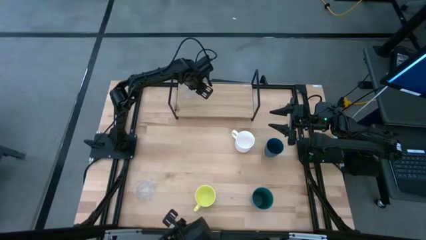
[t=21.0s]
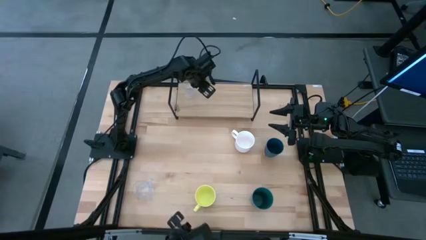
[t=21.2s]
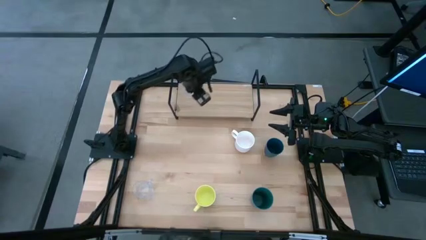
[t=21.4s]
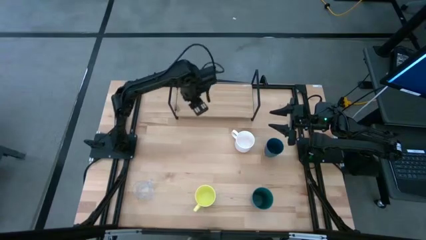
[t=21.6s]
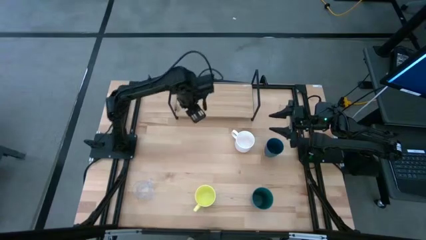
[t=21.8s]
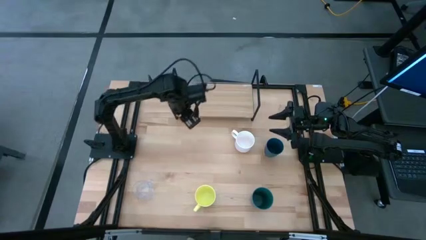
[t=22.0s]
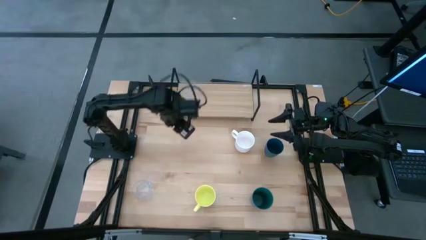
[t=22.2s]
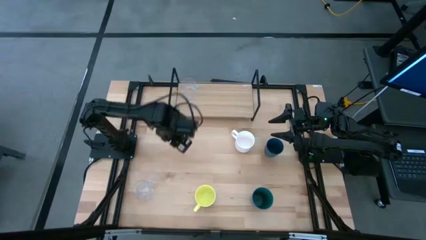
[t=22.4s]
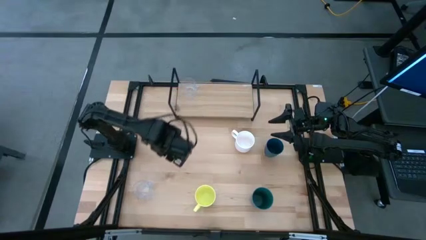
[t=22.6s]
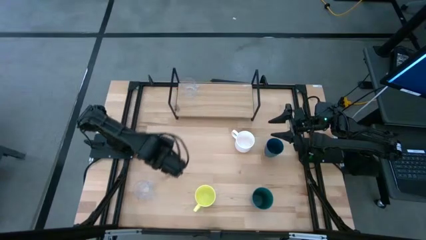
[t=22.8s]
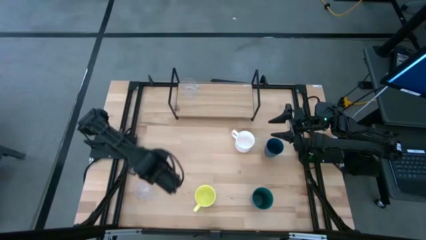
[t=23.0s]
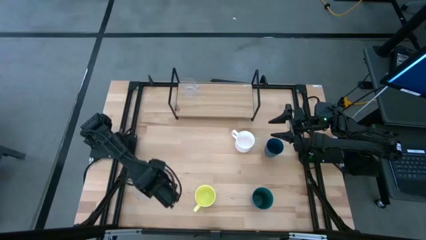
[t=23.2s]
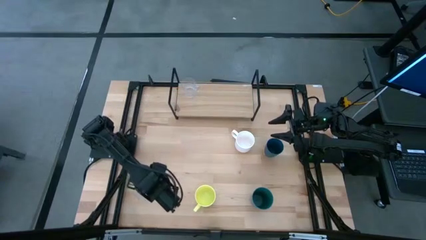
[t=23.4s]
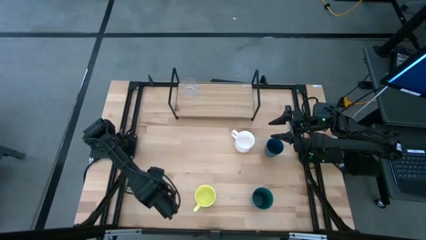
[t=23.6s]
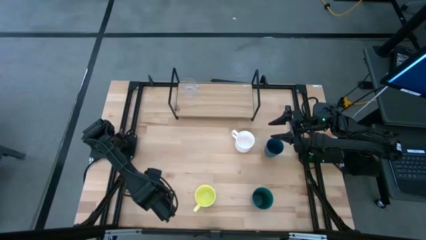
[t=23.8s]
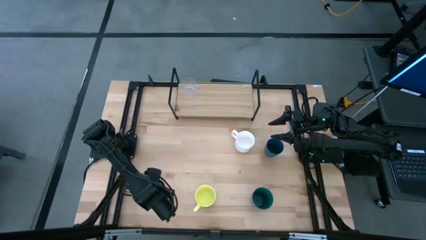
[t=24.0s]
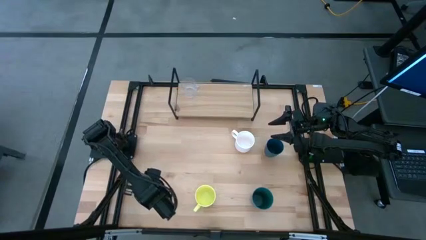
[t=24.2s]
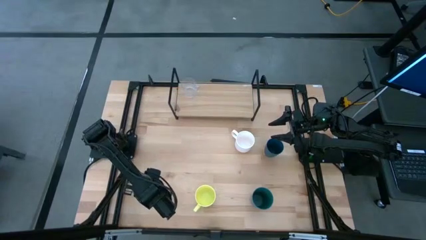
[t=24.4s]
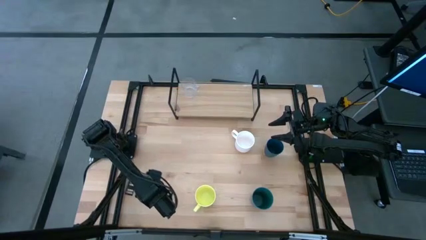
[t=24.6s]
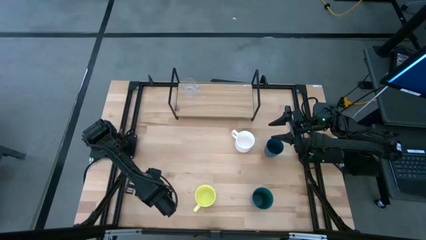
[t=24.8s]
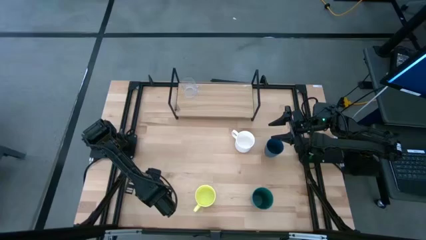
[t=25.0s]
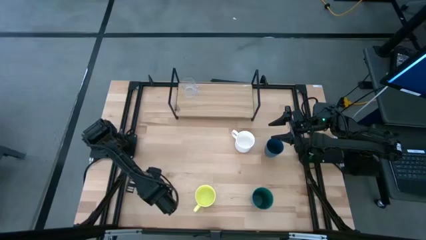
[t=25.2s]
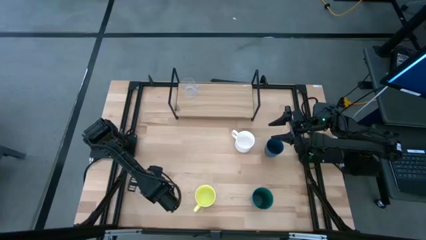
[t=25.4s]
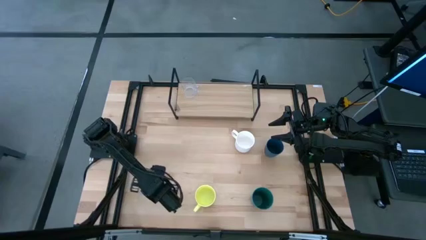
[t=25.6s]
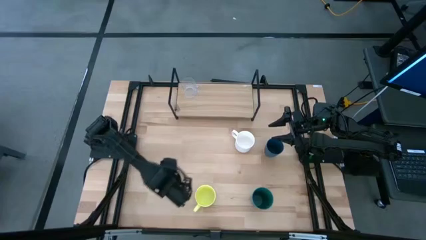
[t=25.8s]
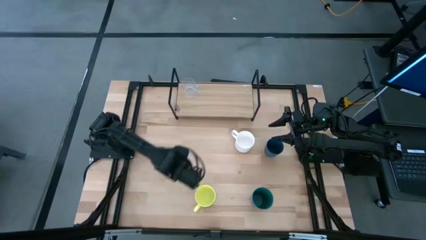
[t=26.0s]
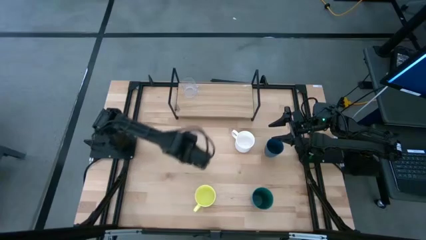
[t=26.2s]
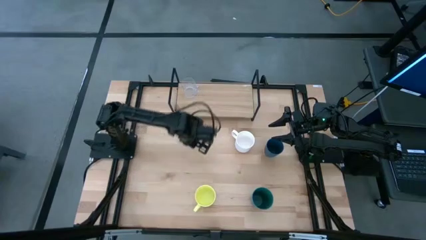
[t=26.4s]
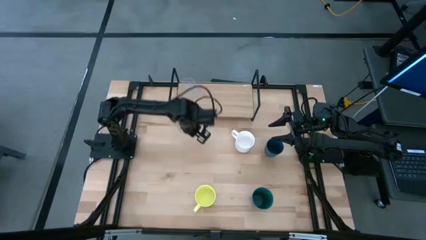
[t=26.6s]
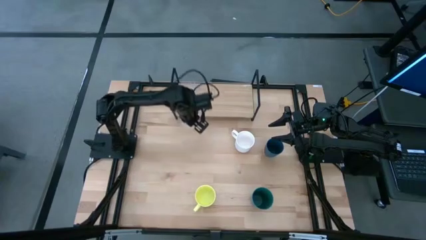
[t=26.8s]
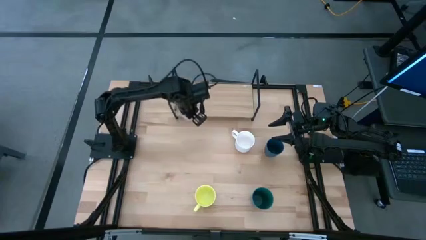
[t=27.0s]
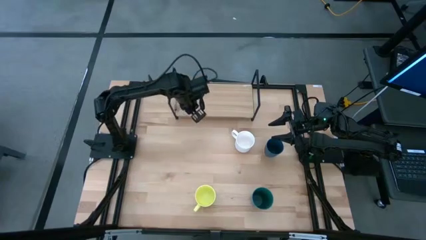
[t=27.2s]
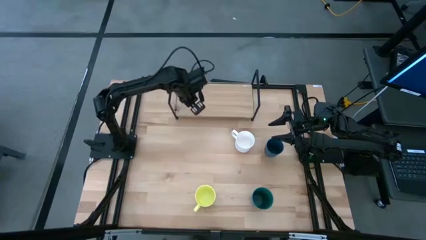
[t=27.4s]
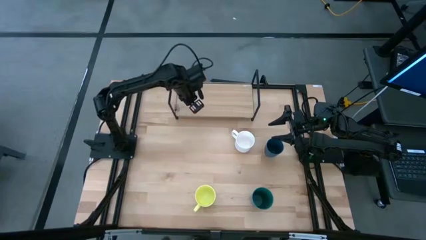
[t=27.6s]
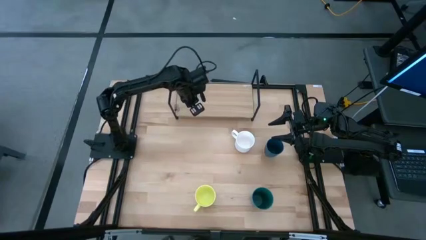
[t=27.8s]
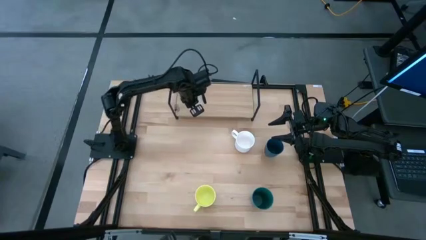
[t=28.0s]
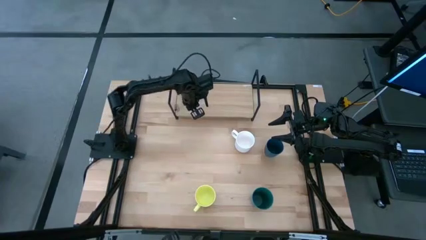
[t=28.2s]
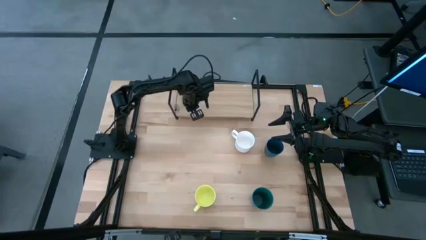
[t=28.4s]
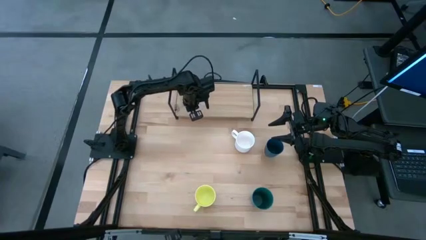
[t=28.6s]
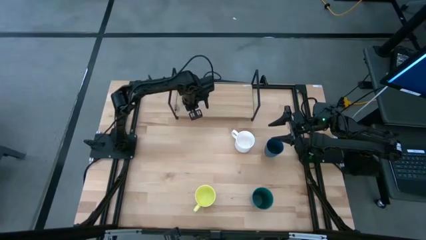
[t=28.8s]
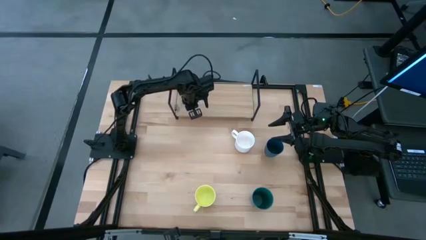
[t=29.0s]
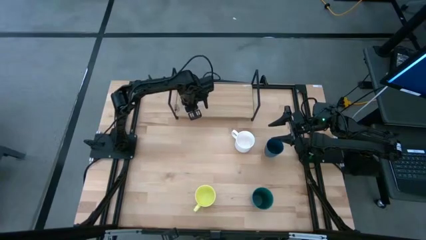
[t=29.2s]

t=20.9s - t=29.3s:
Task: Stack small to large cups/mugs on shelf
Align the transparent mug with the other transparent mug on the shelf

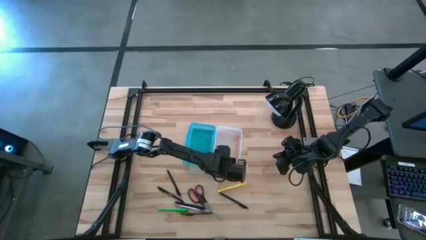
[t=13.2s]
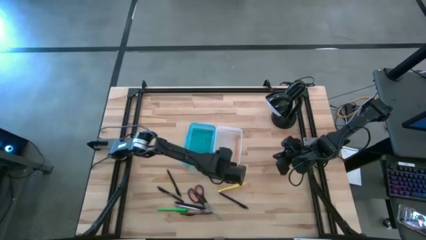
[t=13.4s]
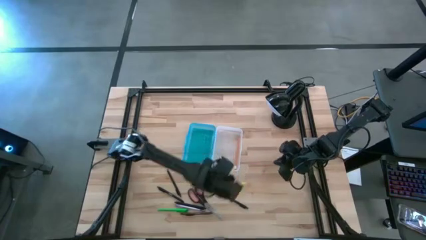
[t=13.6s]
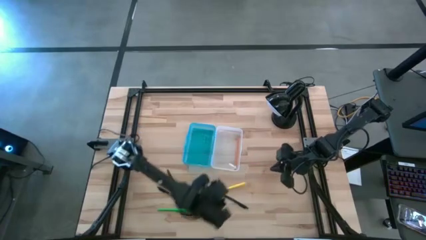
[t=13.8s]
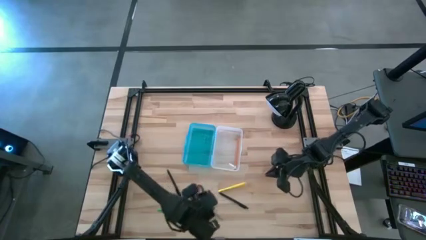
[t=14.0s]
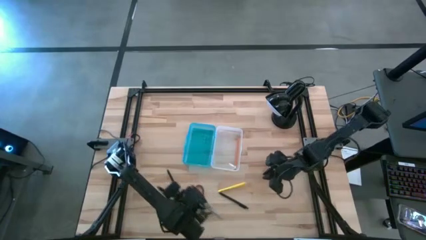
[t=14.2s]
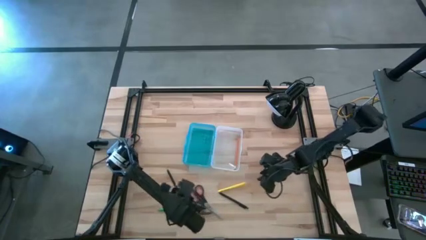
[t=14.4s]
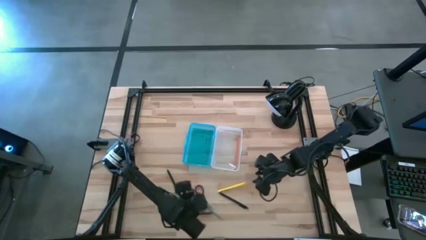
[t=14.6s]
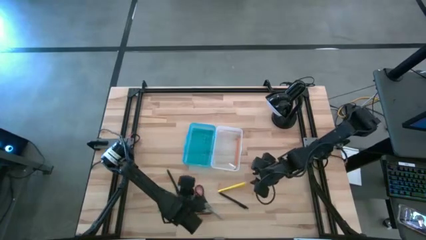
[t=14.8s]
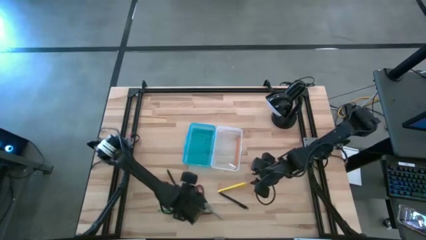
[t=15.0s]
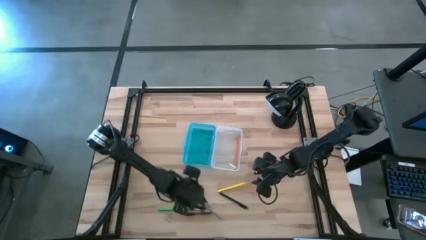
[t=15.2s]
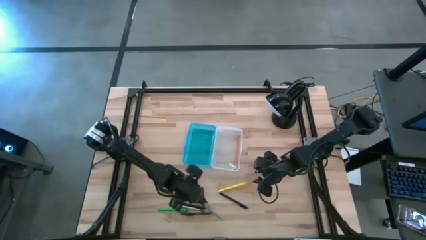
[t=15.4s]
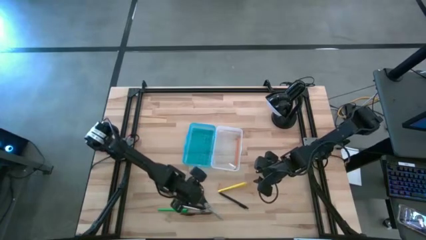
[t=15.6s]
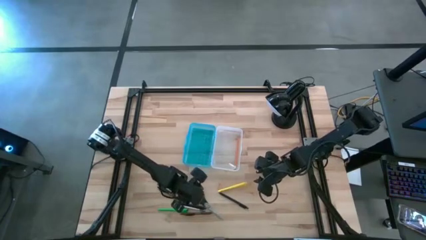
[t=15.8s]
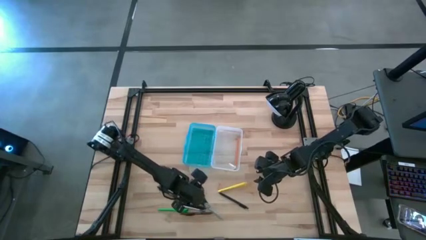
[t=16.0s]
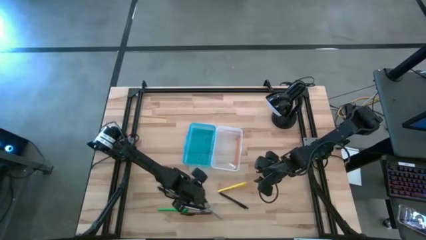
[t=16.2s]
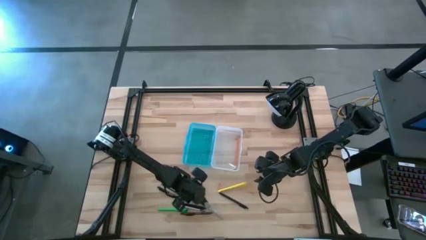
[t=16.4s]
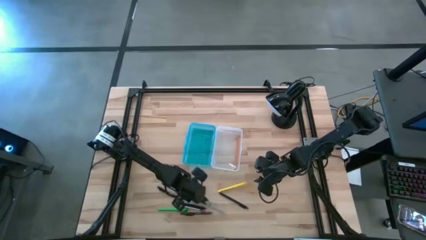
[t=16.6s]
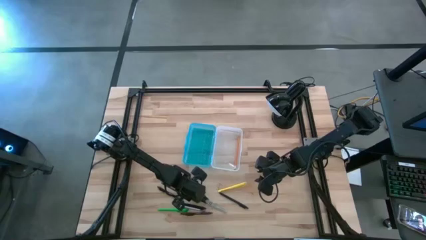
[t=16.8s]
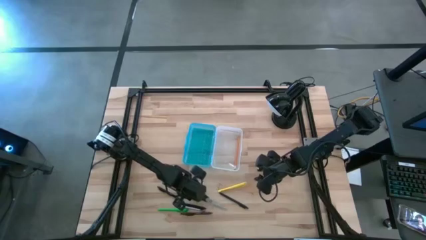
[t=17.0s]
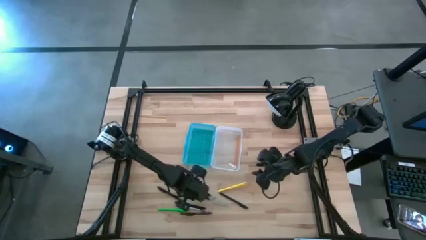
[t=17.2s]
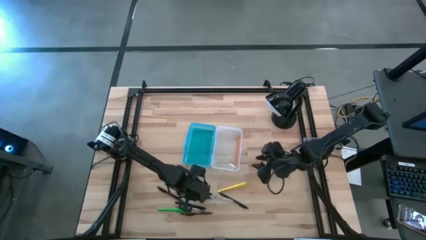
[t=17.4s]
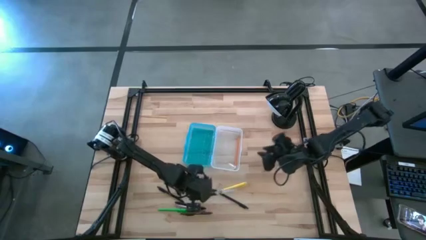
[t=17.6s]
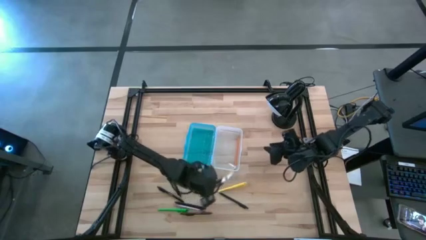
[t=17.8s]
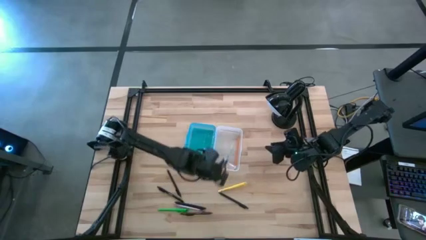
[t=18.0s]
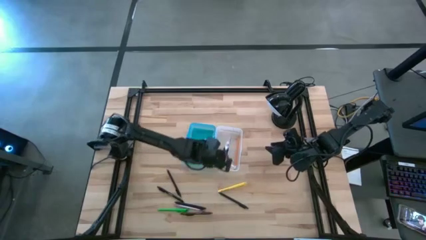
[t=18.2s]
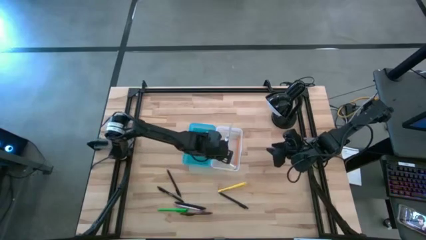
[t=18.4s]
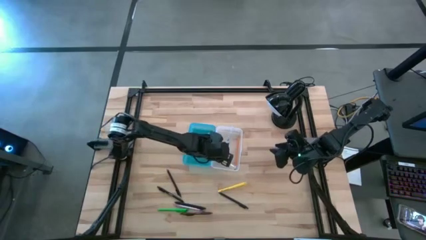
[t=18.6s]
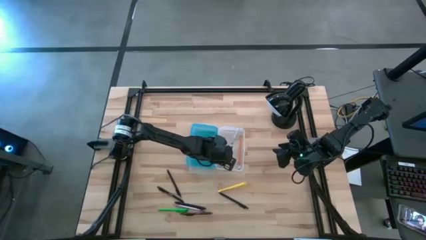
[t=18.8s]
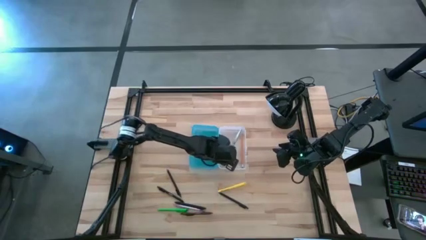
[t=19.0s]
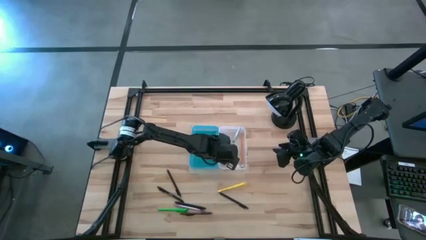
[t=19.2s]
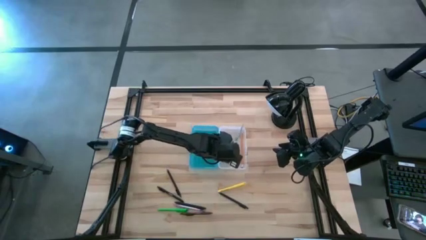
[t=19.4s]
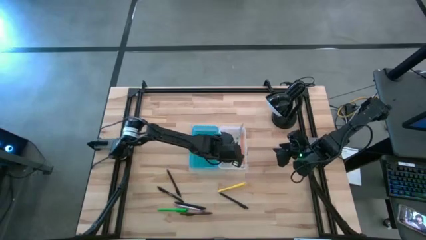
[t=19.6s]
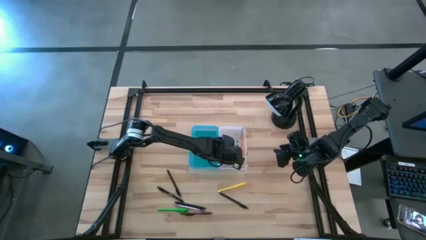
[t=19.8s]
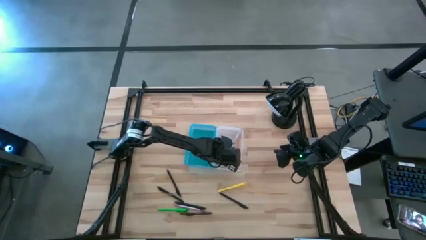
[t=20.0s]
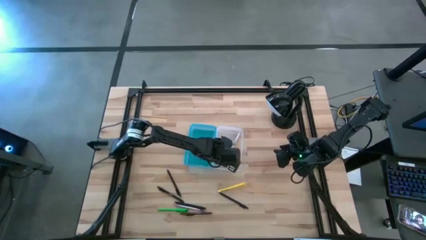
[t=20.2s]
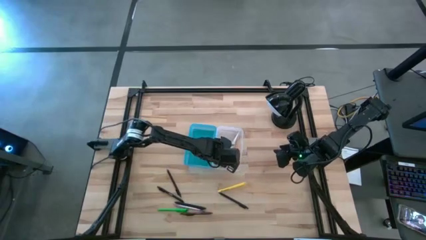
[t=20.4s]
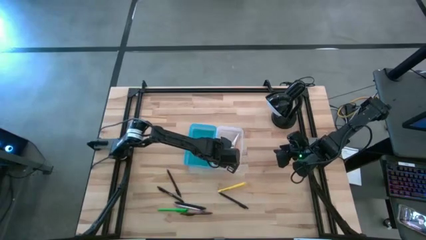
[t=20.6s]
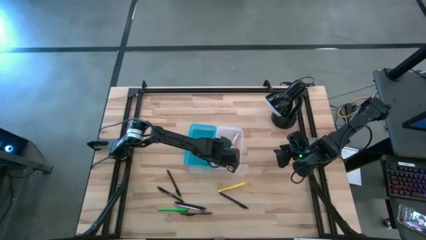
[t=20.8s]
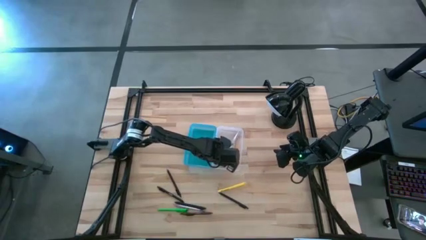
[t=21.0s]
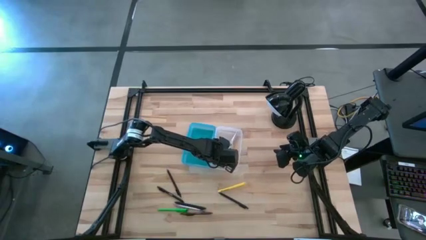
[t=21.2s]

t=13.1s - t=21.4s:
Task: Pick & place school supplies into a supply box
Put the black scissors into the supply box
